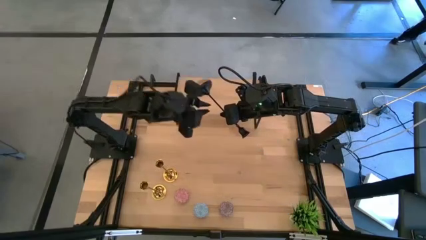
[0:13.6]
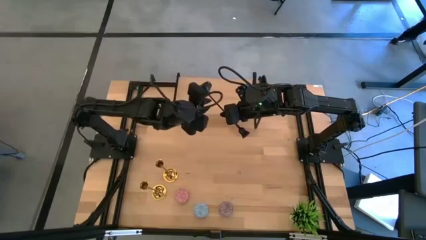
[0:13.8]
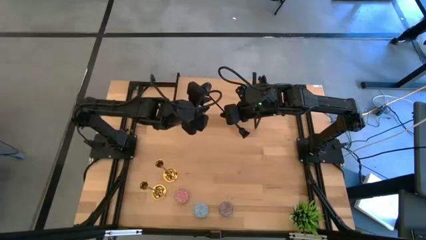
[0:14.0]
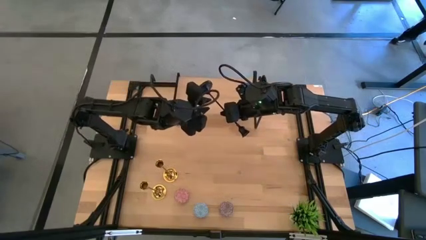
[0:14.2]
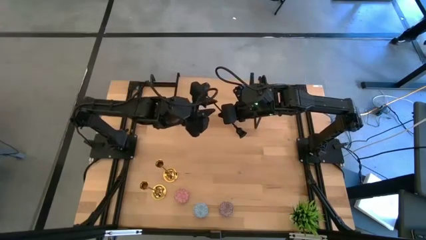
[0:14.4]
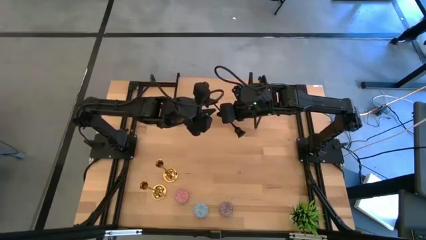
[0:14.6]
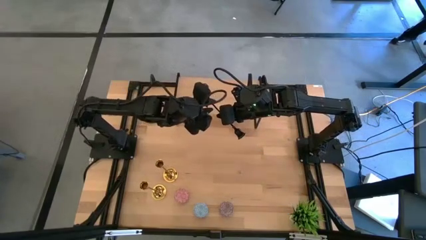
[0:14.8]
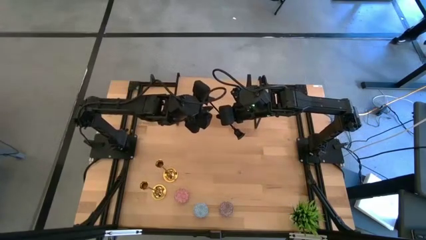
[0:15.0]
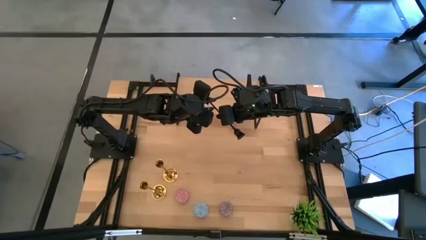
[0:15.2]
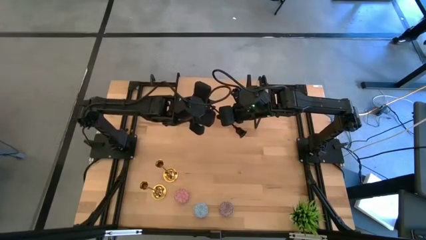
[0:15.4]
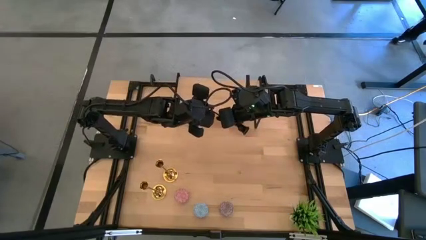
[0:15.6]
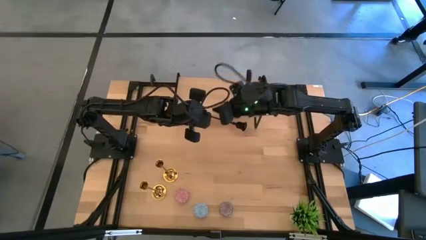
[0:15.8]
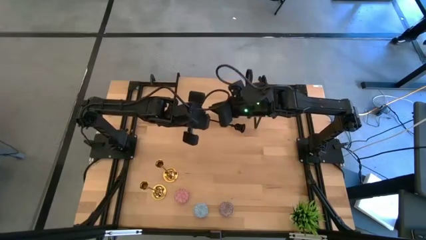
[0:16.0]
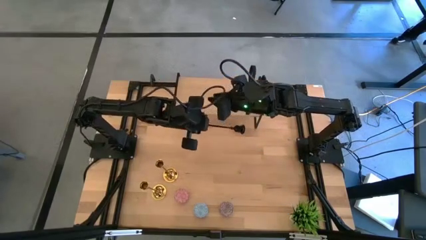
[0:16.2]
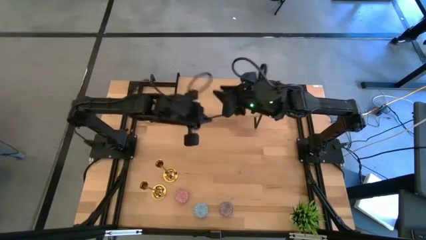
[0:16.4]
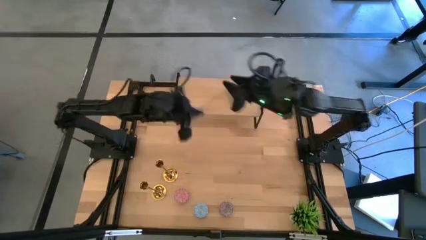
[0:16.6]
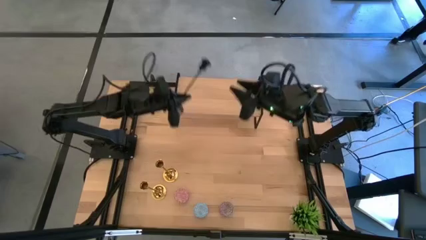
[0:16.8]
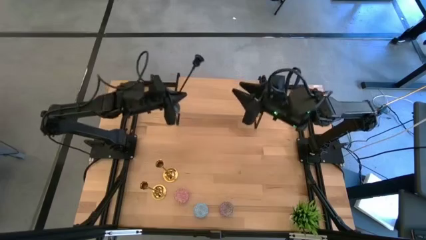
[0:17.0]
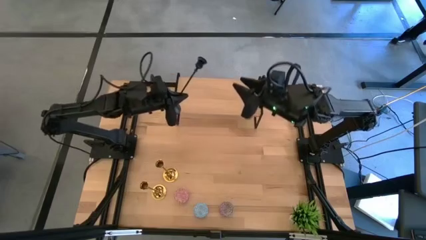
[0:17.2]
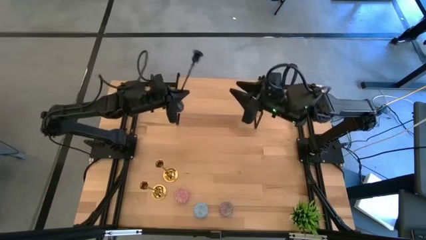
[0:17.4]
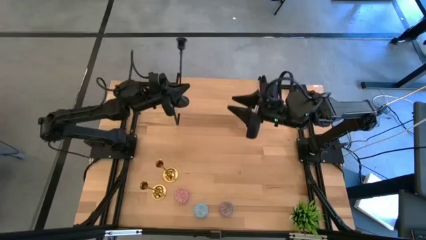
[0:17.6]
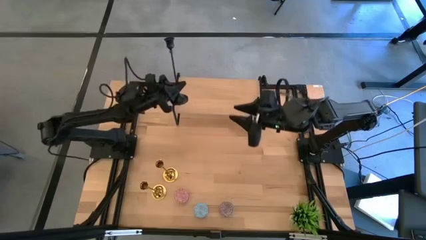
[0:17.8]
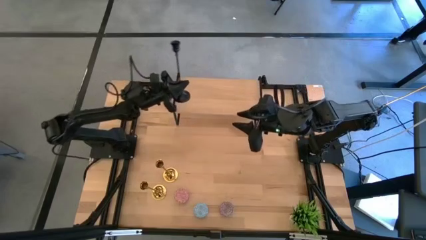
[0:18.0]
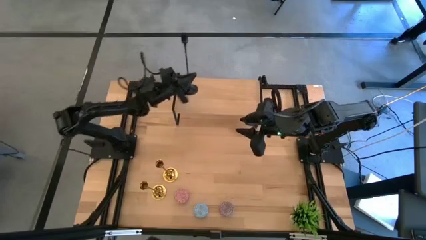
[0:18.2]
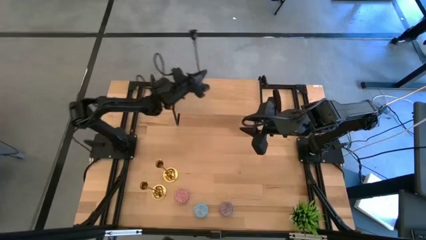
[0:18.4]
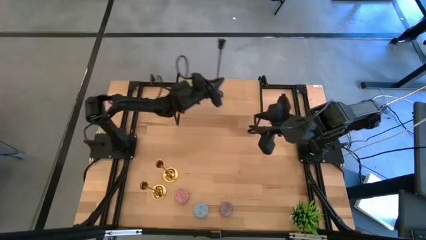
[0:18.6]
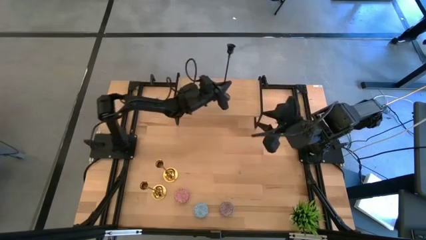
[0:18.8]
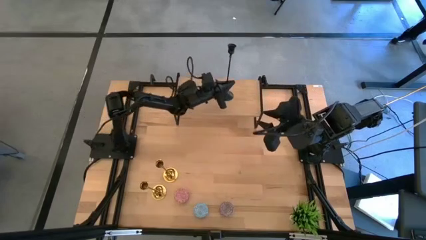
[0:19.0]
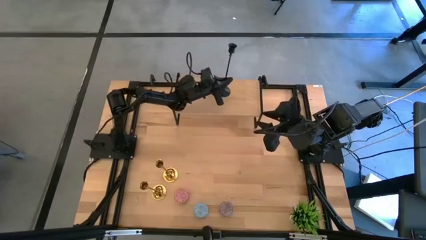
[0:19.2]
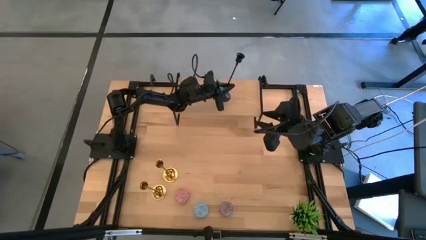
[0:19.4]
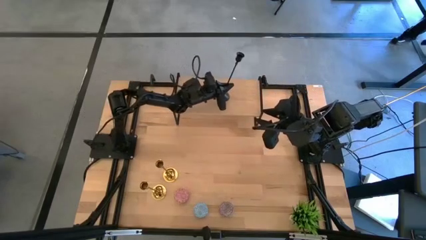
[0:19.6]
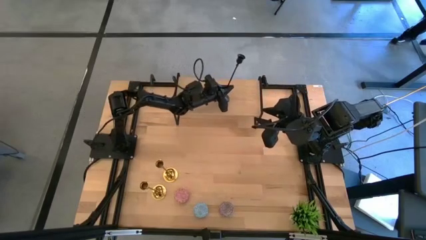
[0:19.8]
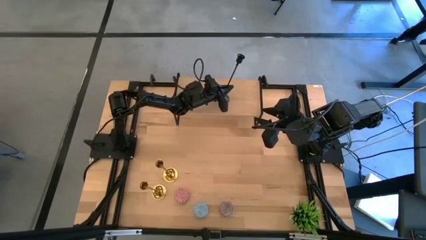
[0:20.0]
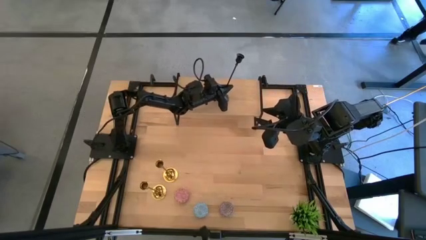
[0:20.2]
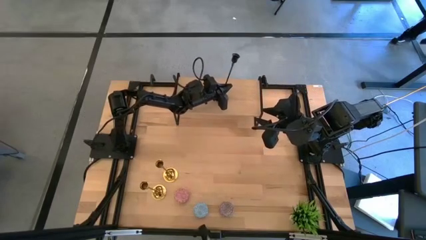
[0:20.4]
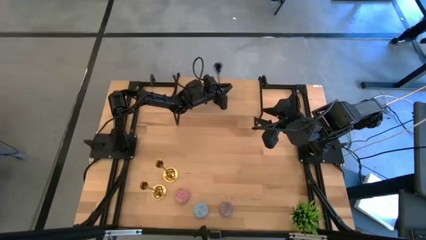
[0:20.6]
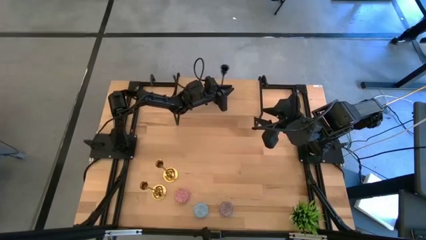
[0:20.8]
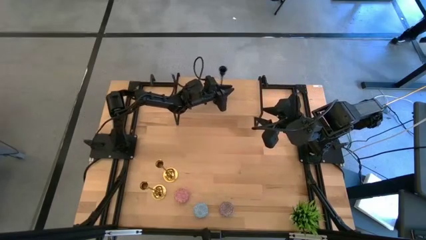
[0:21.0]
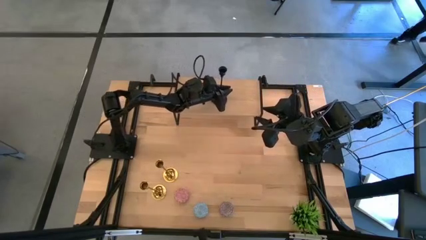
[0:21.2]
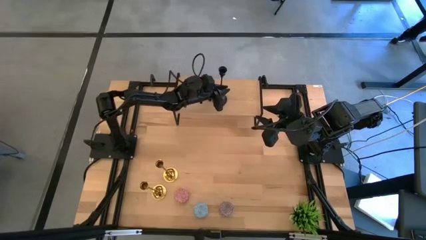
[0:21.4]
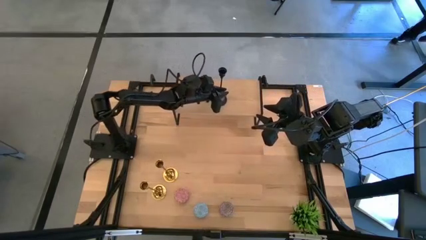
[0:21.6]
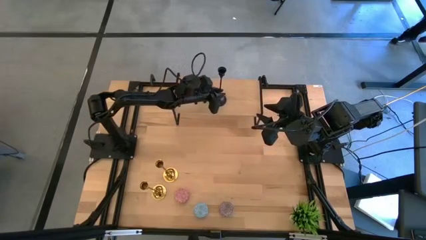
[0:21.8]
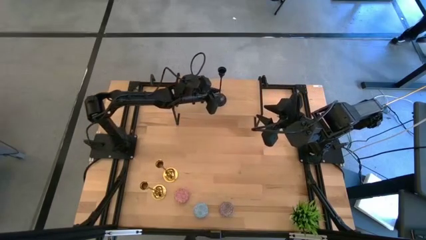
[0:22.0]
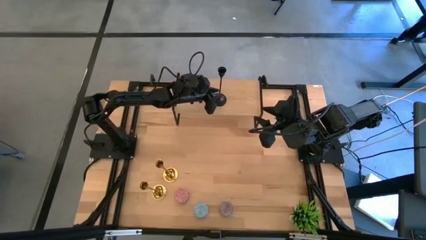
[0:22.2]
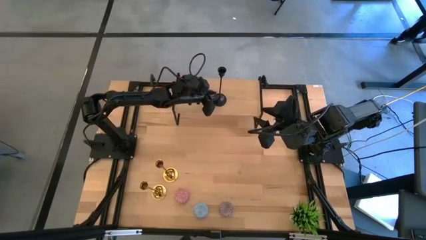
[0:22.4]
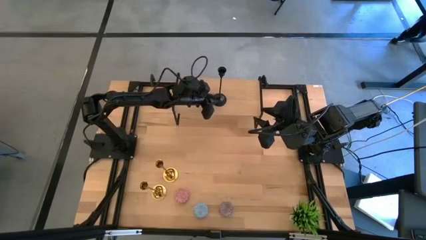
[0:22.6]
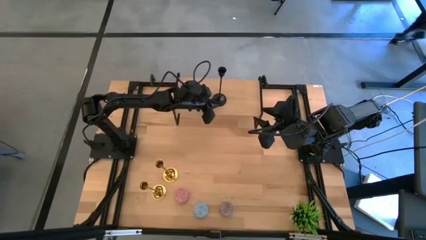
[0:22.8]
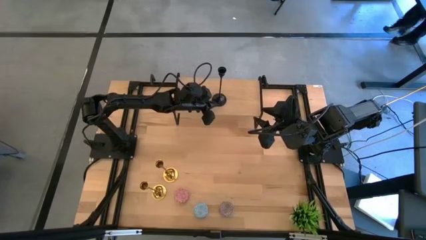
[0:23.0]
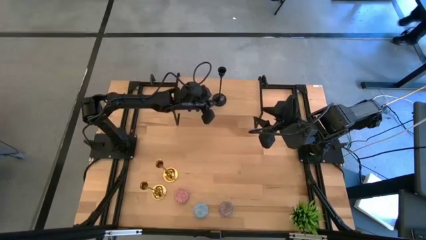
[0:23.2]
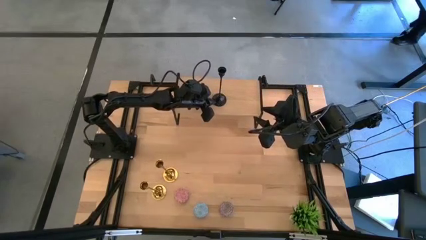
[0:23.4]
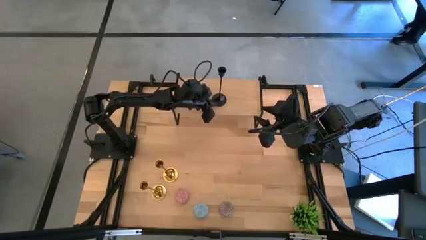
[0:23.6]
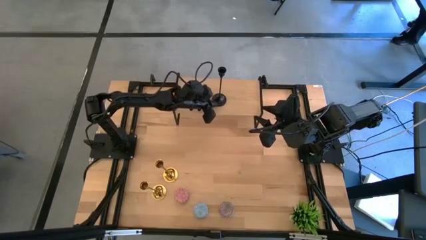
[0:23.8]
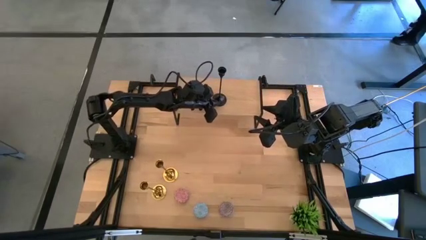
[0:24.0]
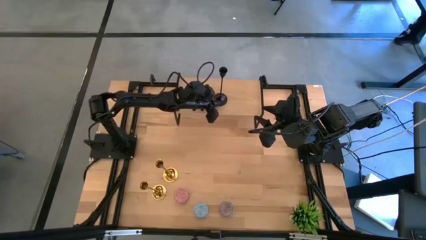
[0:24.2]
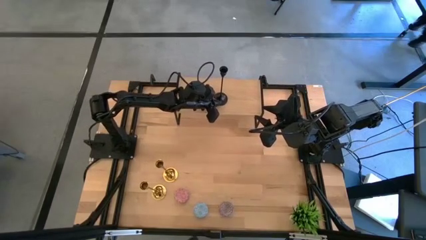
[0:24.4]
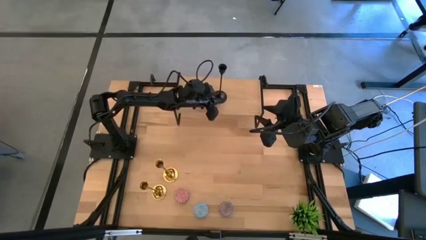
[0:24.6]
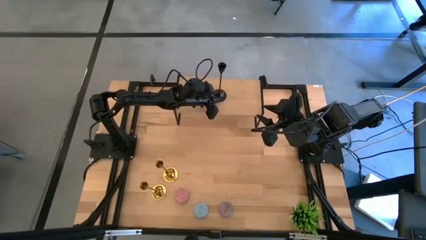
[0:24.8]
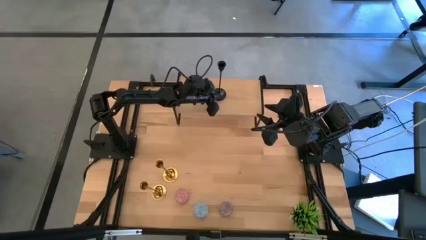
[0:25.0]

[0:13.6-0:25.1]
Task: Pick & Place candle stick holders
Put the black candle holder on the shelf
